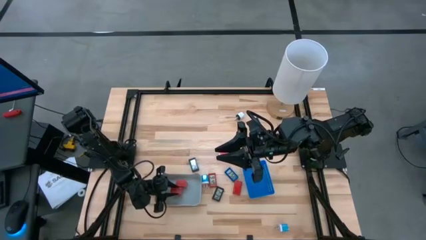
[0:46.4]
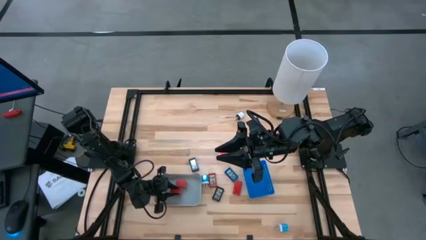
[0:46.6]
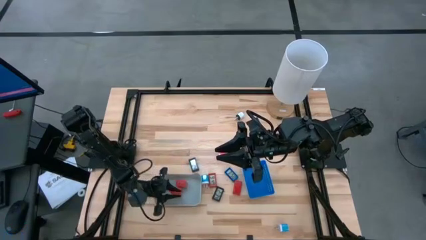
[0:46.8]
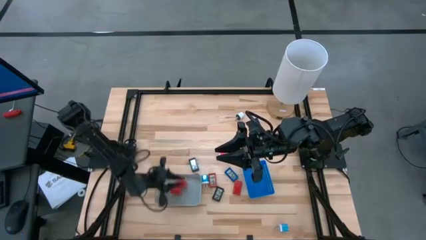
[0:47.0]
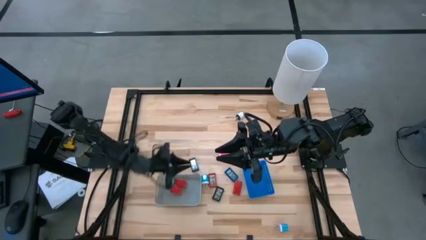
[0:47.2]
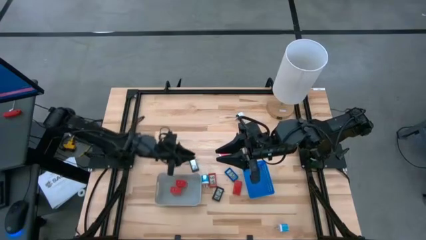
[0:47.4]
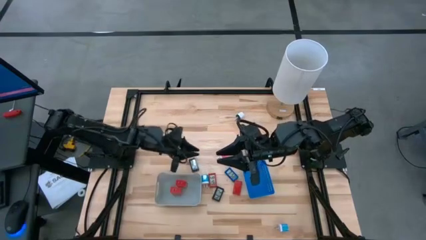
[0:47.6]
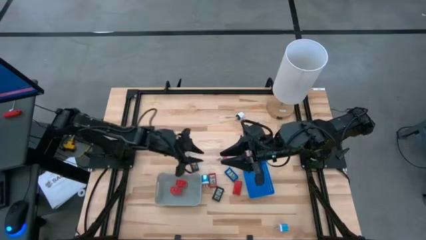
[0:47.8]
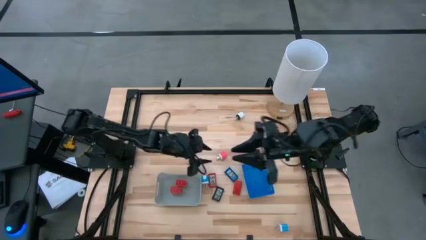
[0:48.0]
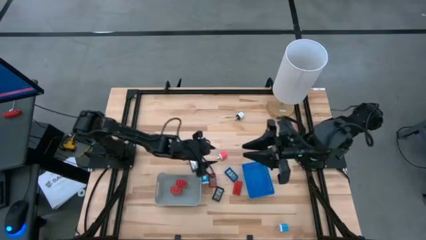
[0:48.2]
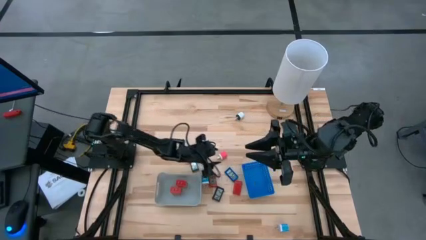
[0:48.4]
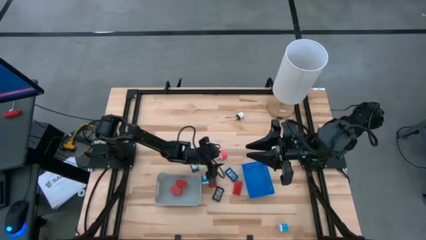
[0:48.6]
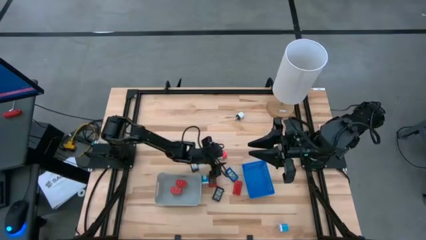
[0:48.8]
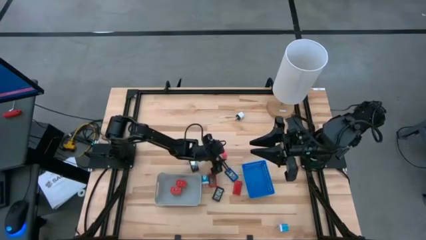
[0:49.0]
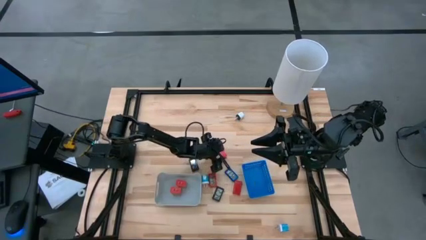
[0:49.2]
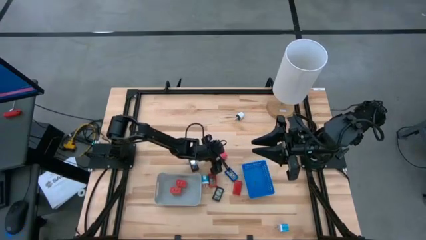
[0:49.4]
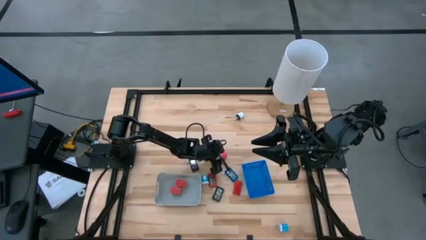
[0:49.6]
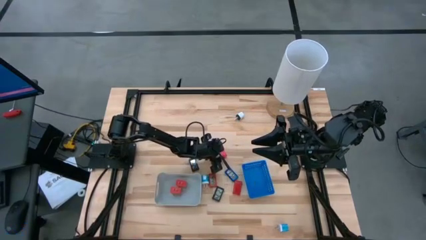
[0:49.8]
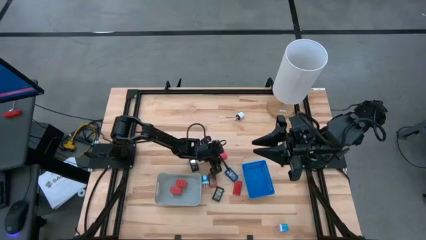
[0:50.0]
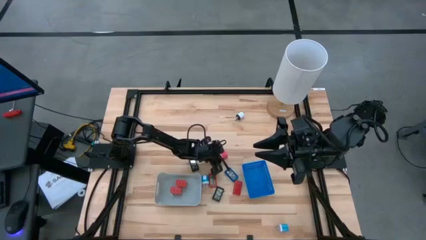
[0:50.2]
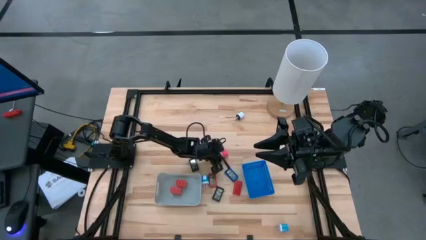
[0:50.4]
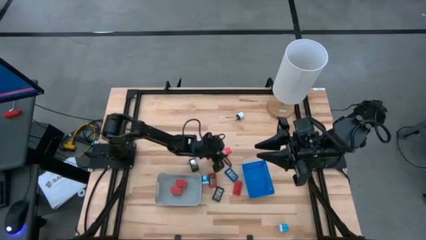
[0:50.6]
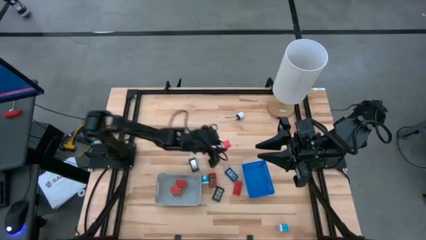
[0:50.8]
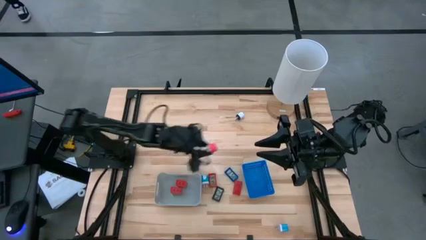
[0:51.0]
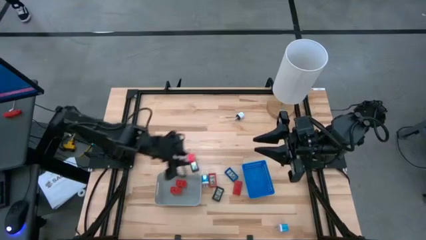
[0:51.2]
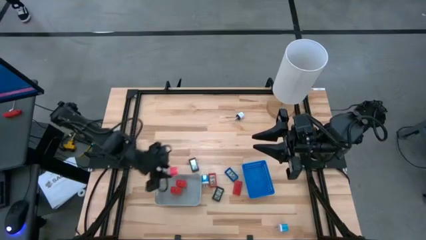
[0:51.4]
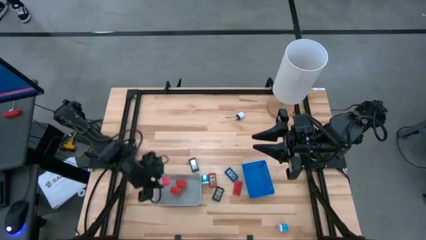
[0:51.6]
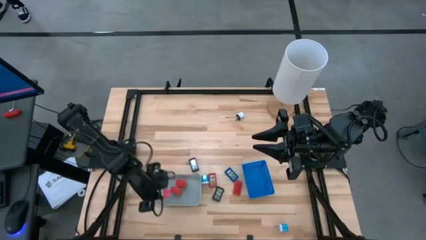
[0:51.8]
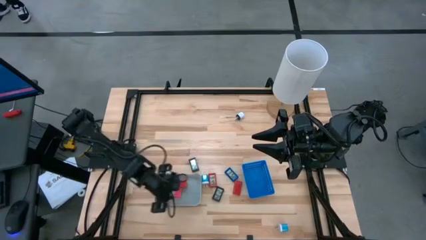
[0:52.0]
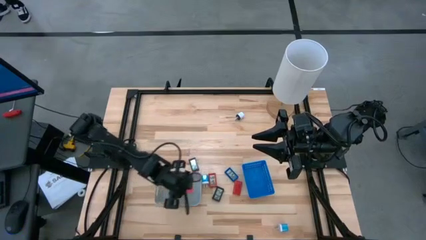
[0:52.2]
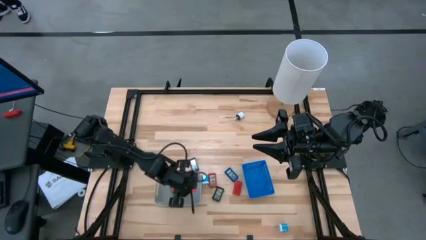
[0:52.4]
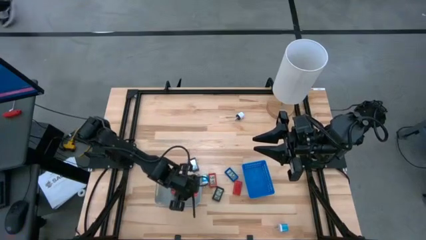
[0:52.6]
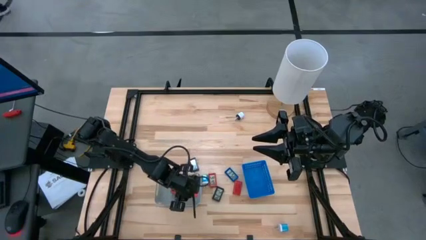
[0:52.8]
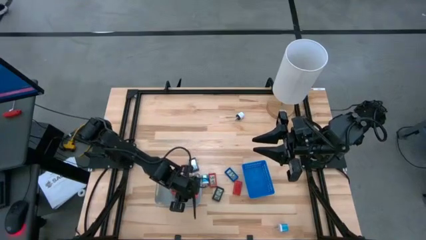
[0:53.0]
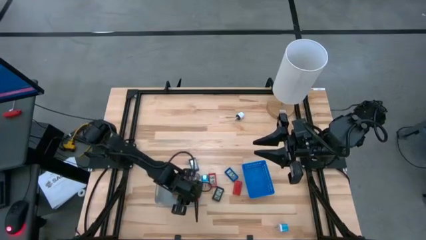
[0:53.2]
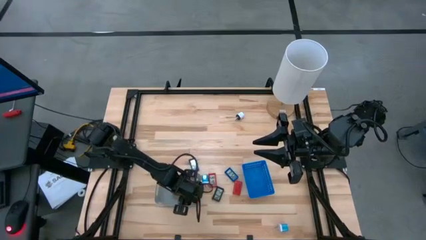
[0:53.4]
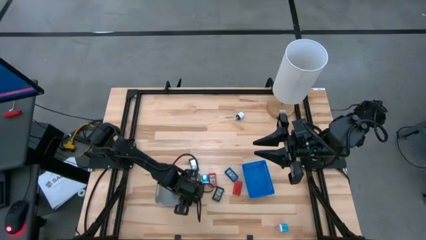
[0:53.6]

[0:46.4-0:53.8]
Task: Pick & Place Office items
Put the pink charger adapter into the gray bin

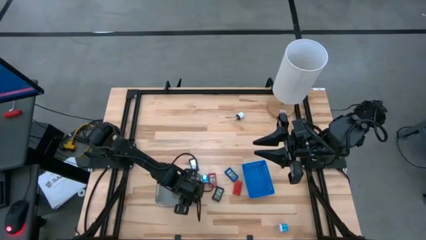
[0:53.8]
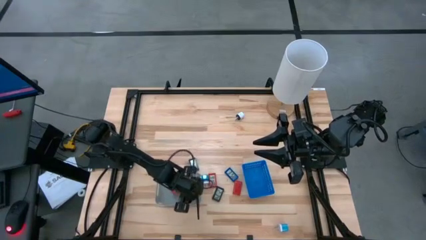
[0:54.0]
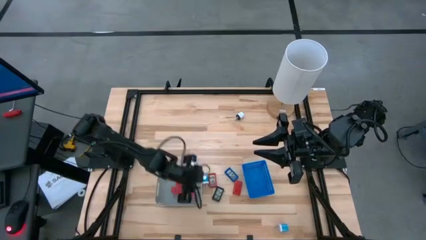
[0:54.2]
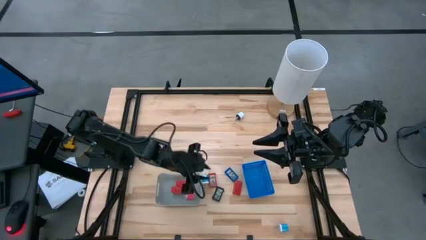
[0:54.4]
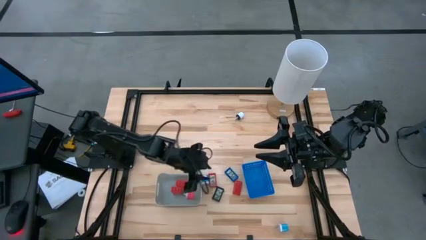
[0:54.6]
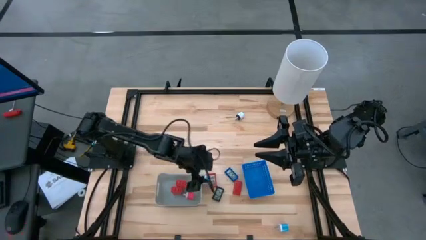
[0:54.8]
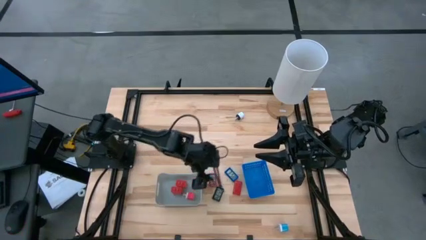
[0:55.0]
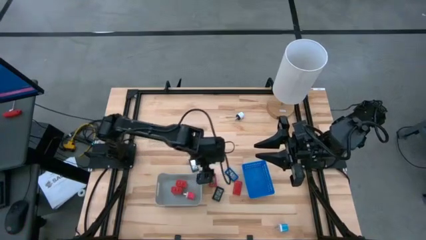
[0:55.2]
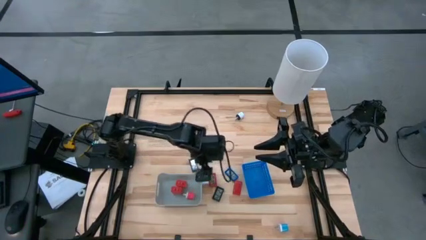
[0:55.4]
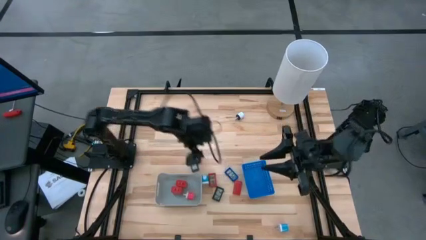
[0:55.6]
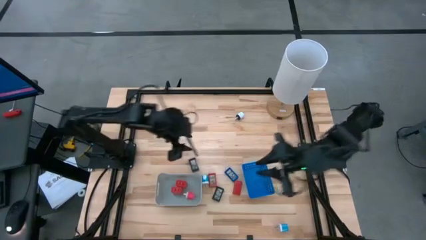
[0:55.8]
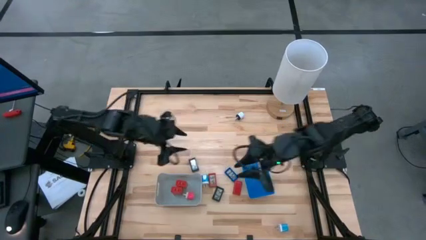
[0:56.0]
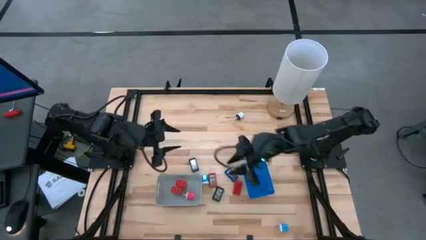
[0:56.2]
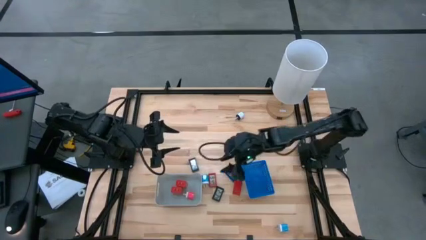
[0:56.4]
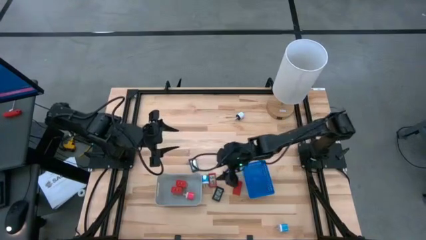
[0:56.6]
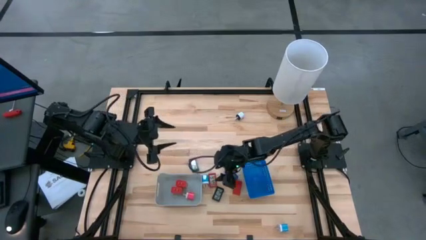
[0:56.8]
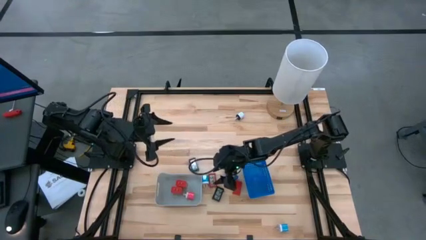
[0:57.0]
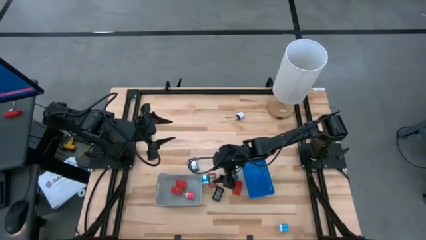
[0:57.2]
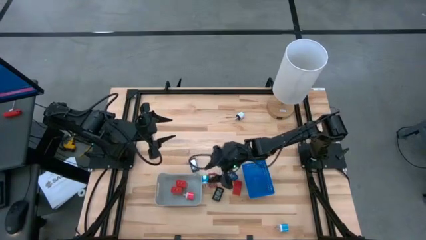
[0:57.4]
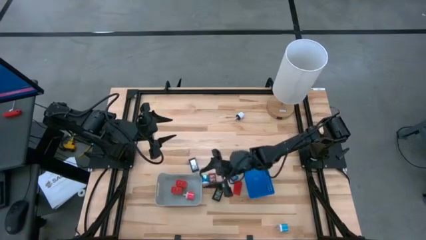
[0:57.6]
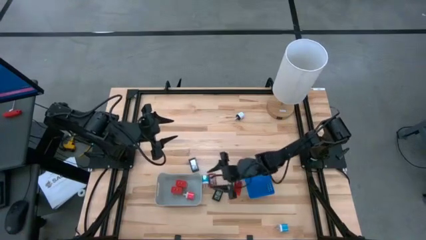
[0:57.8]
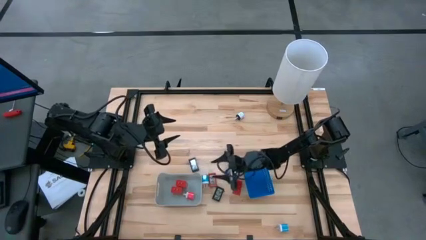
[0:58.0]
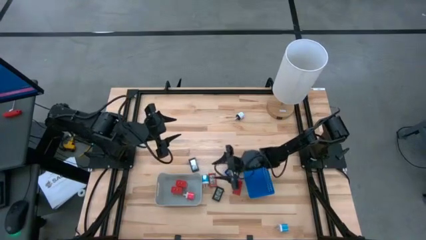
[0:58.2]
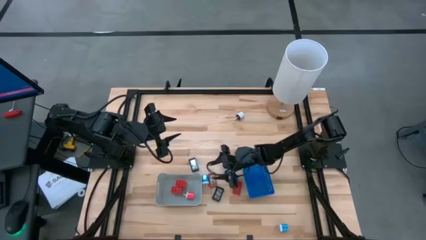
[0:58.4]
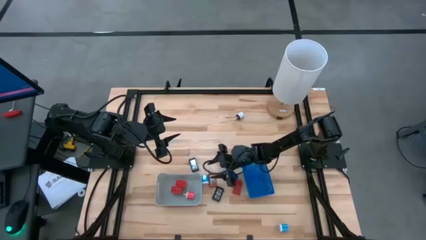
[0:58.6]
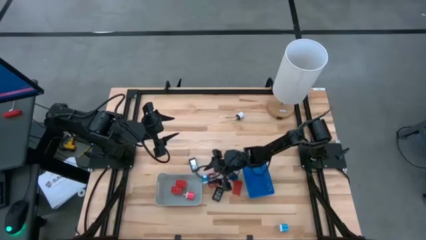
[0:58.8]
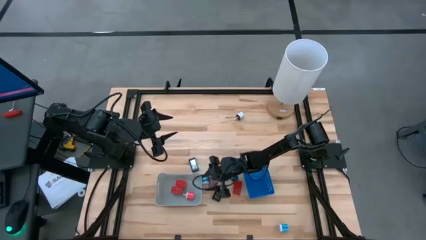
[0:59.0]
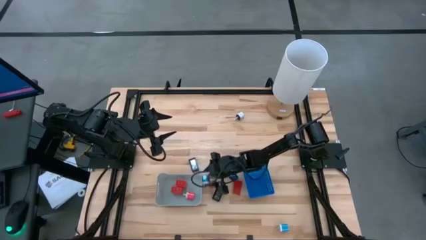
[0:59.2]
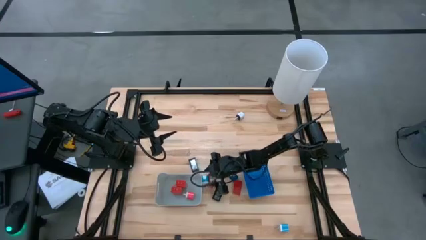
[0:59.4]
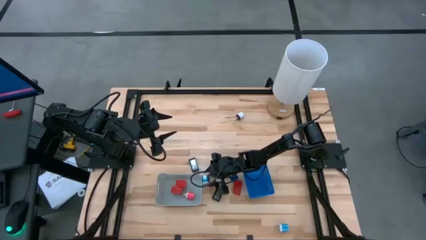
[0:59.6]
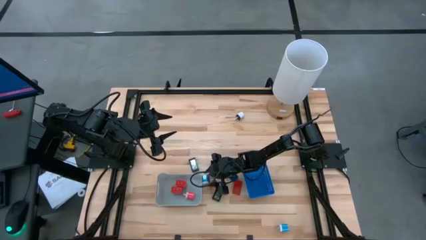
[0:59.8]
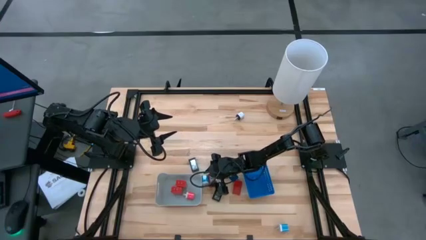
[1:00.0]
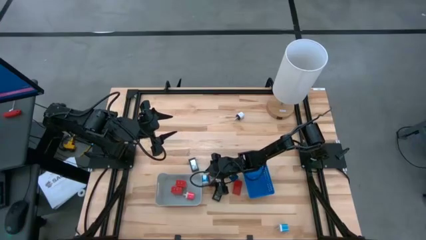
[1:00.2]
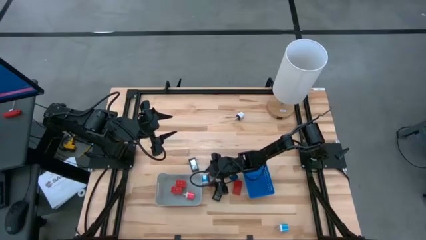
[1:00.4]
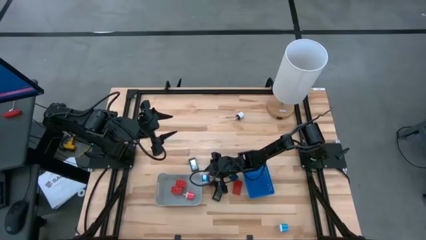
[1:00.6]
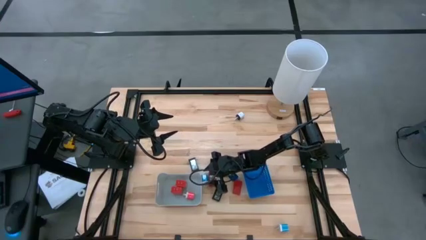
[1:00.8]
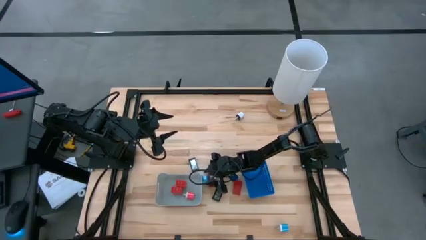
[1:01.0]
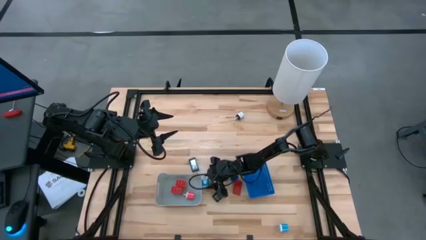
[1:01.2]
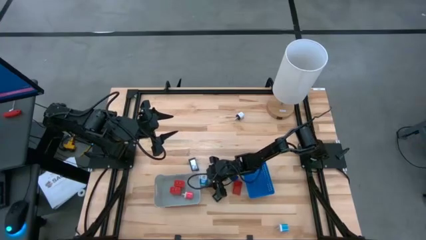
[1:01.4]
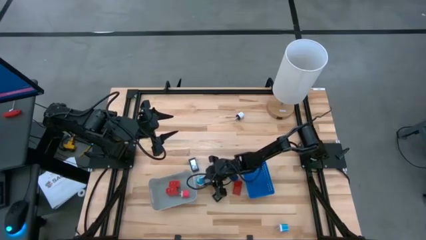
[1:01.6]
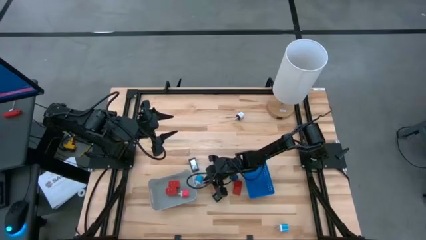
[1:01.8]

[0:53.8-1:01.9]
Put the top blue charger adapter into the gray bin
